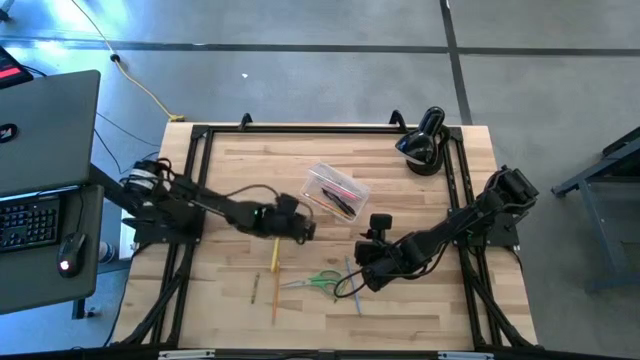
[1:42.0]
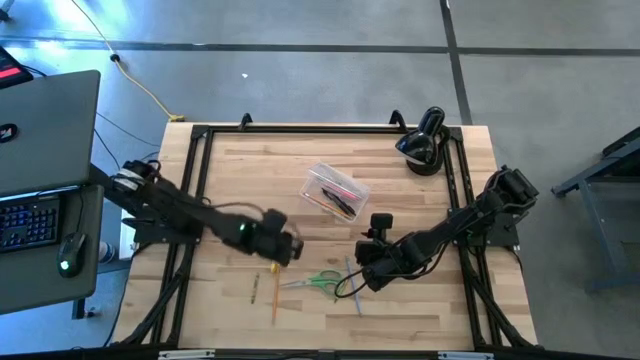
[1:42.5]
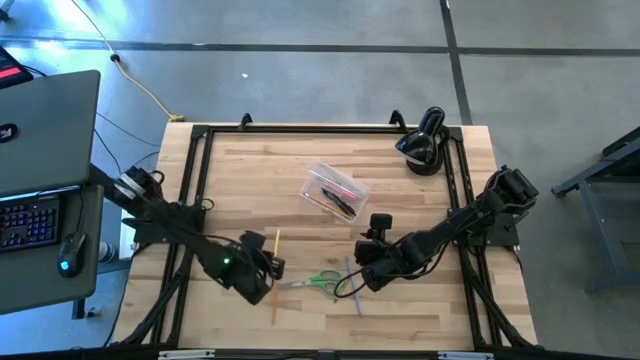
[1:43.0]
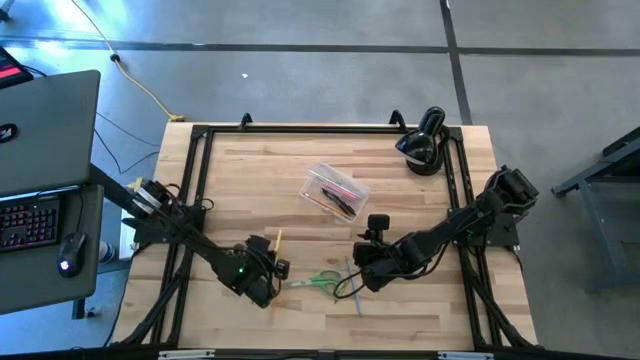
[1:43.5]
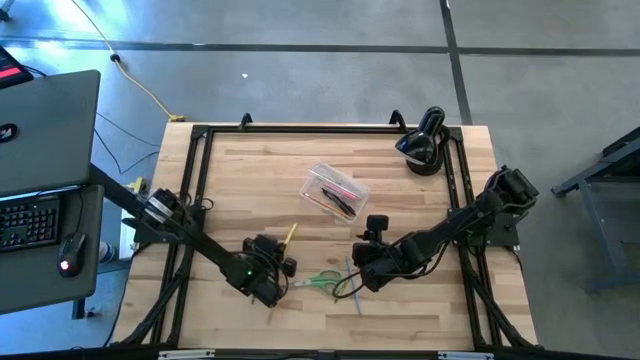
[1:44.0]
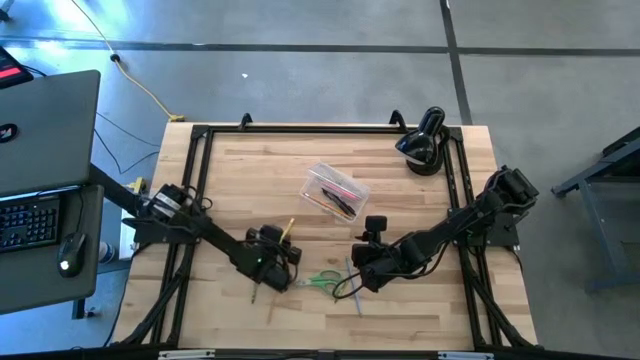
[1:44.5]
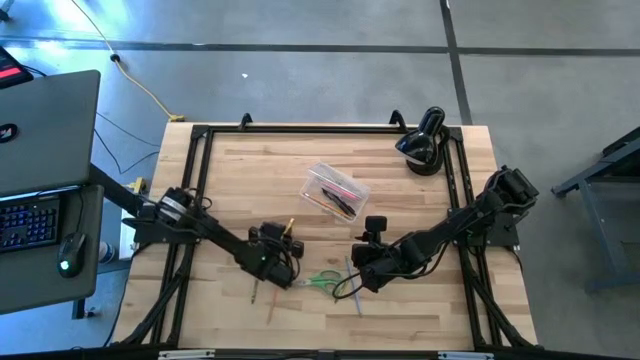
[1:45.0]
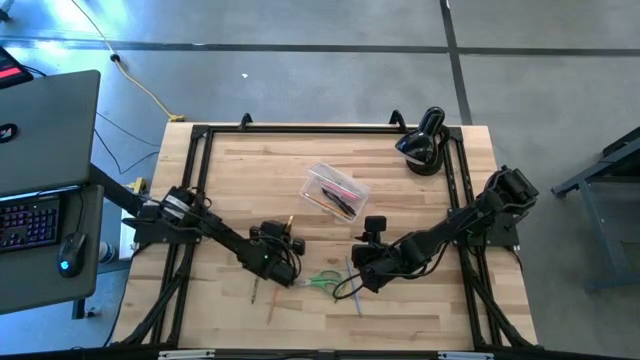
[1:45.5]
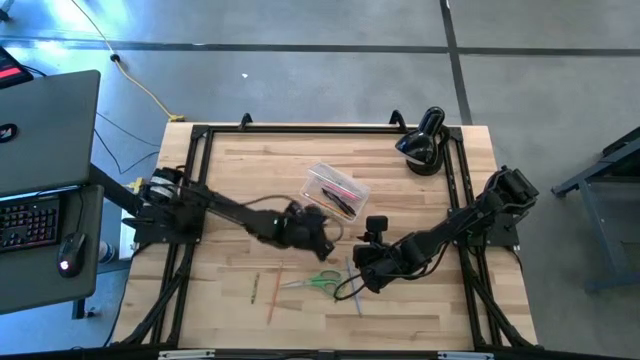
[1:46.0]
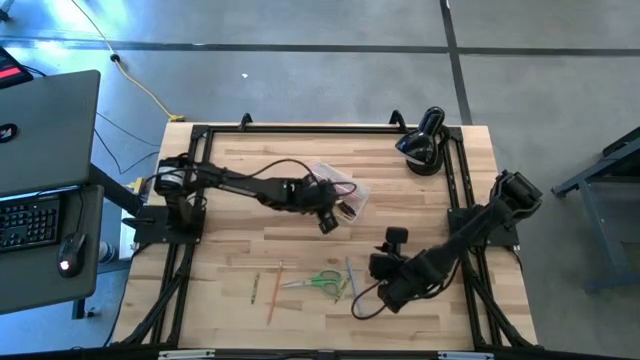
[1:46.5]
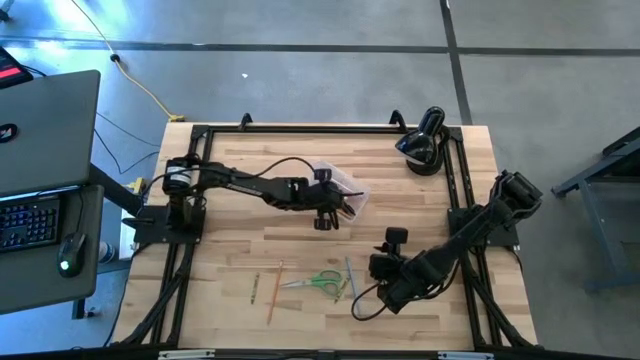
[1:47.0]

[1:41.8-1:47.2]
Task: Pick & place school supplies into a supply box
Put the yellow pen into the supply box

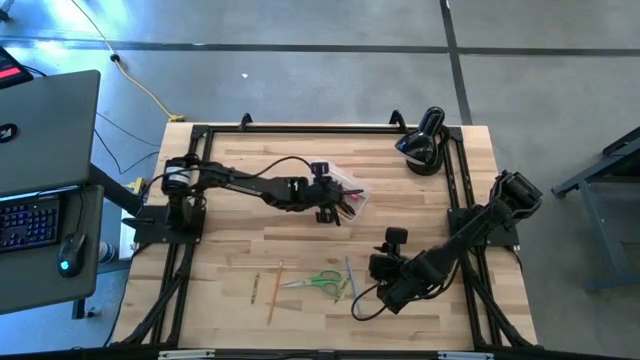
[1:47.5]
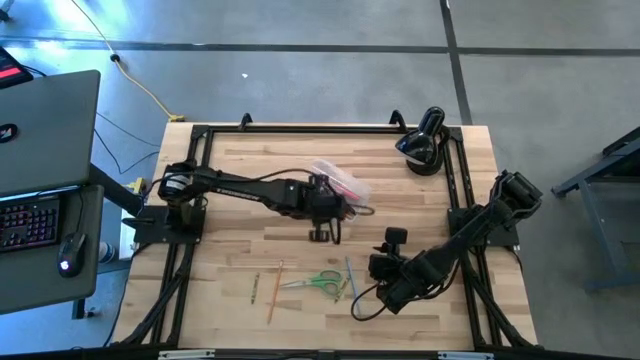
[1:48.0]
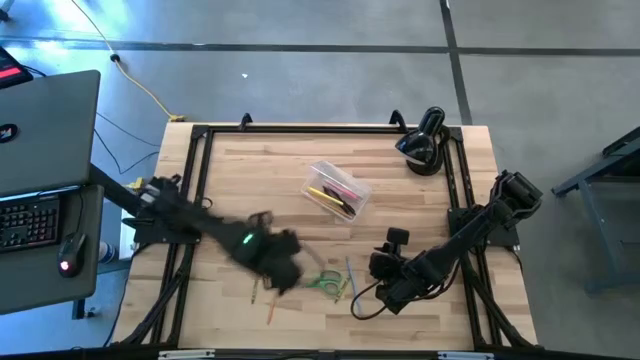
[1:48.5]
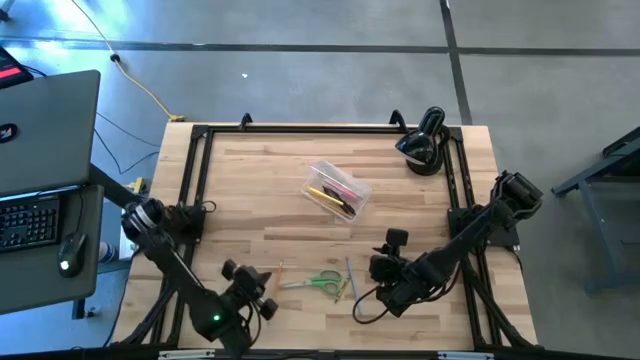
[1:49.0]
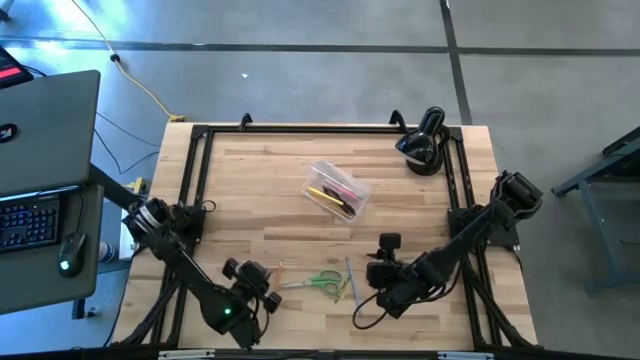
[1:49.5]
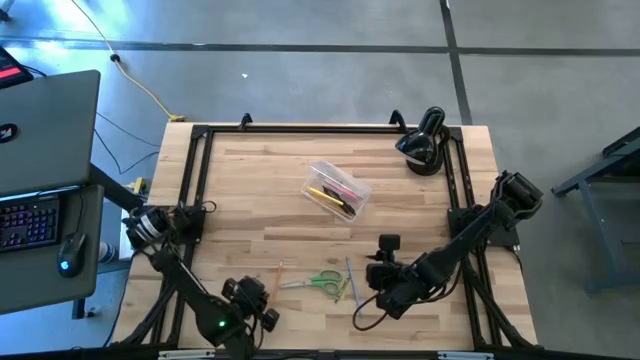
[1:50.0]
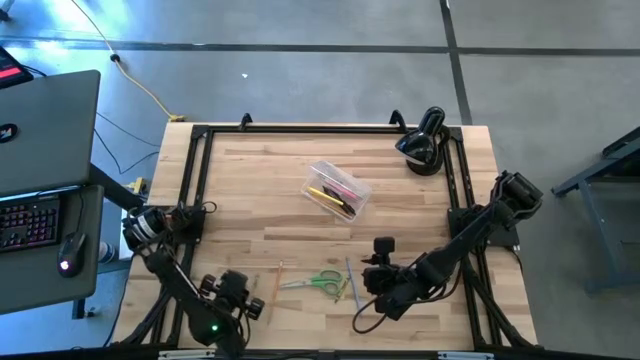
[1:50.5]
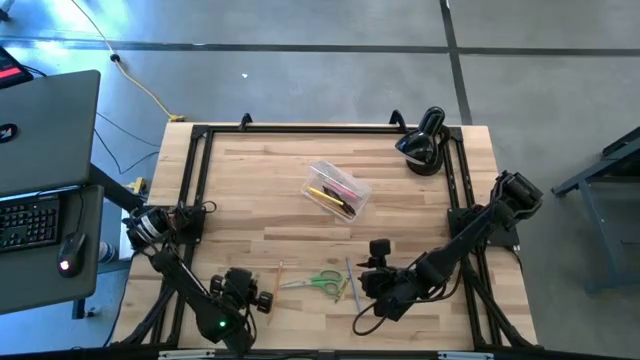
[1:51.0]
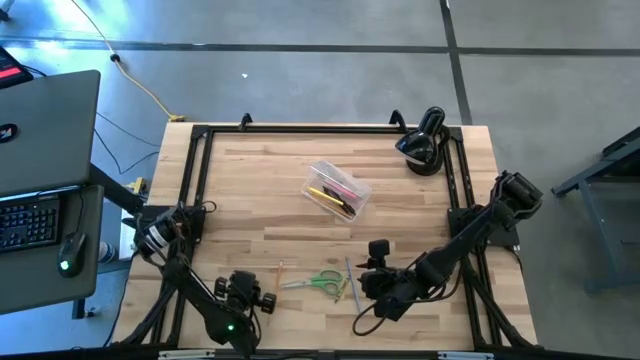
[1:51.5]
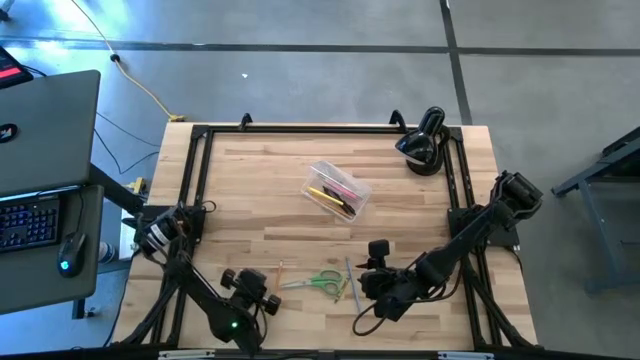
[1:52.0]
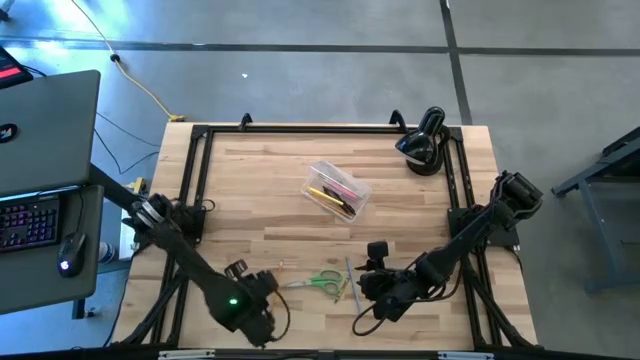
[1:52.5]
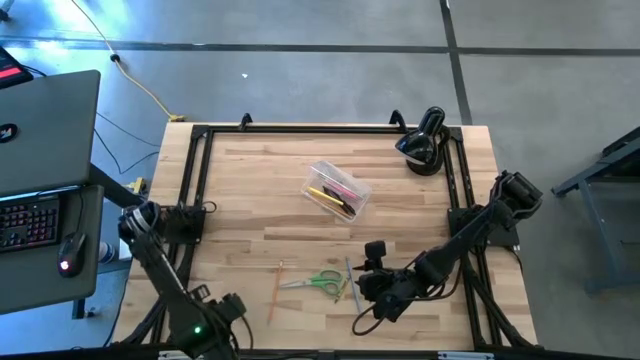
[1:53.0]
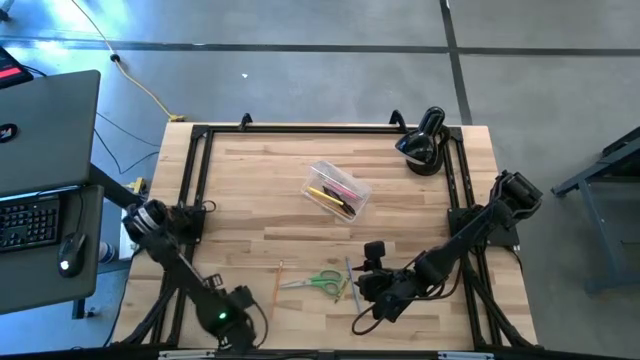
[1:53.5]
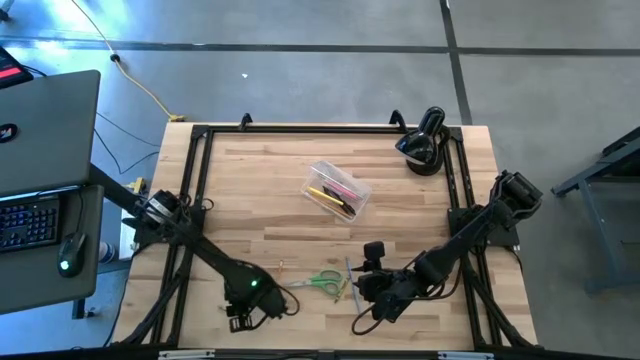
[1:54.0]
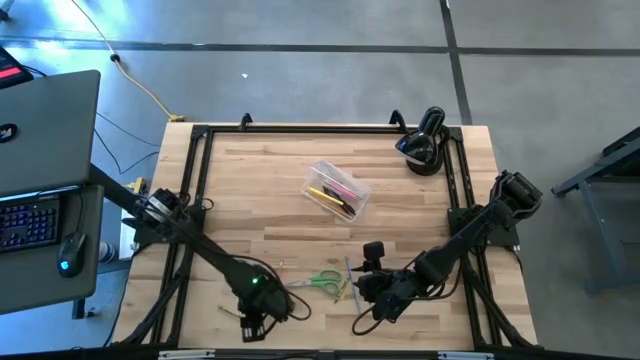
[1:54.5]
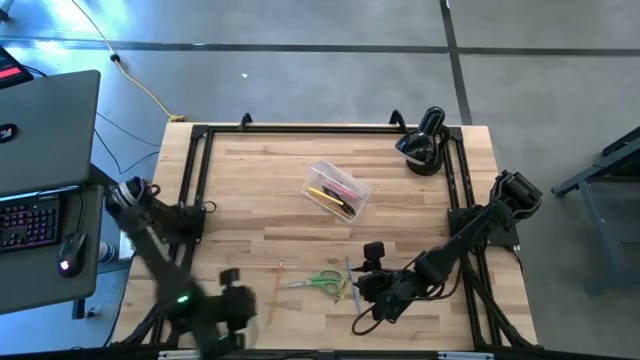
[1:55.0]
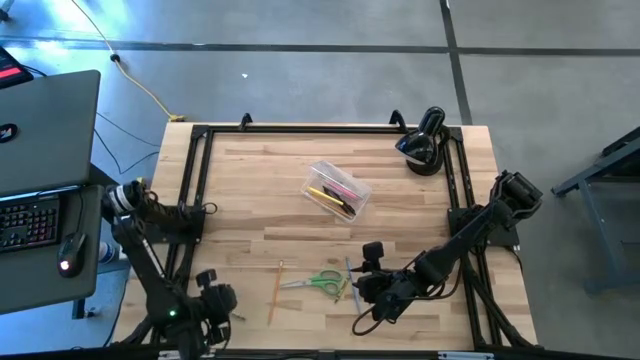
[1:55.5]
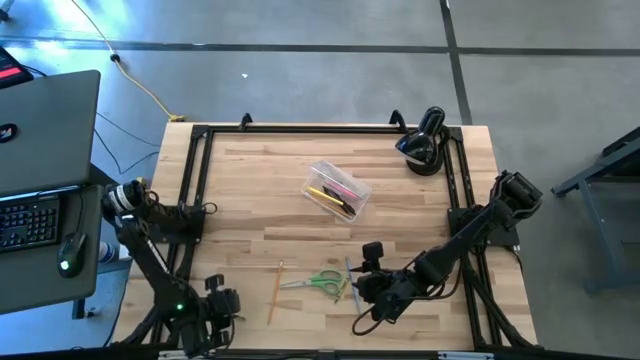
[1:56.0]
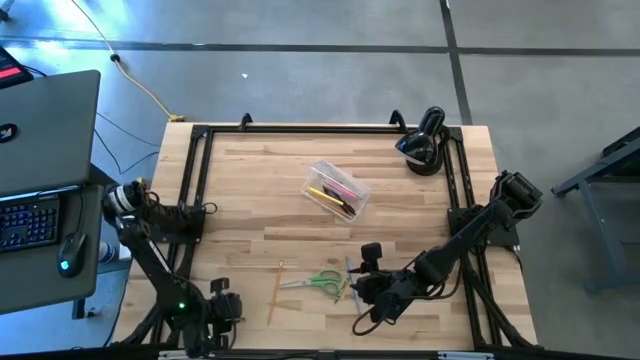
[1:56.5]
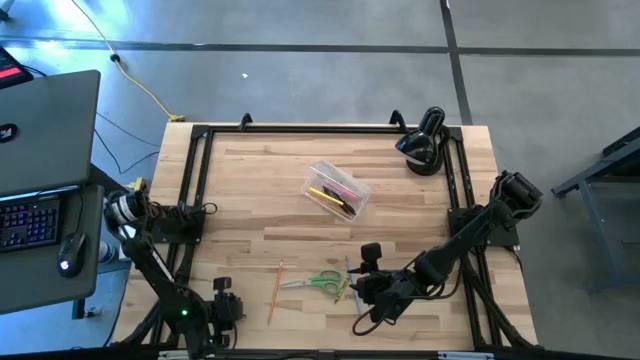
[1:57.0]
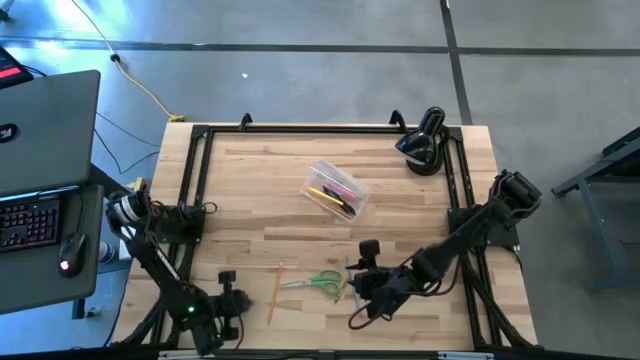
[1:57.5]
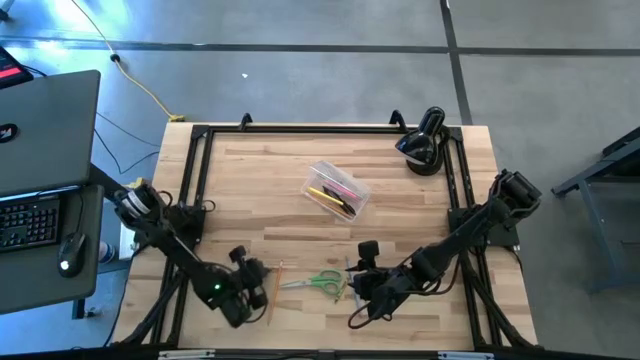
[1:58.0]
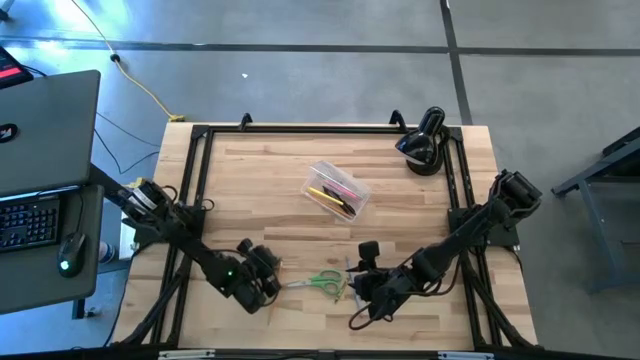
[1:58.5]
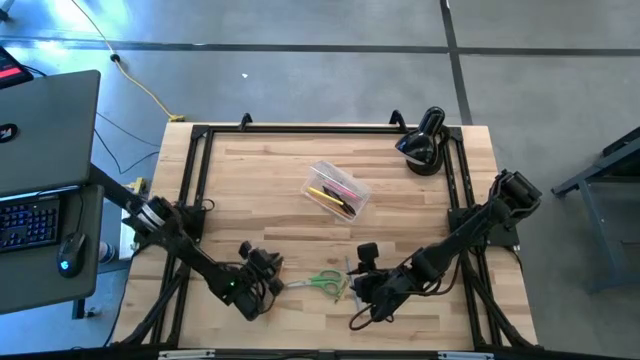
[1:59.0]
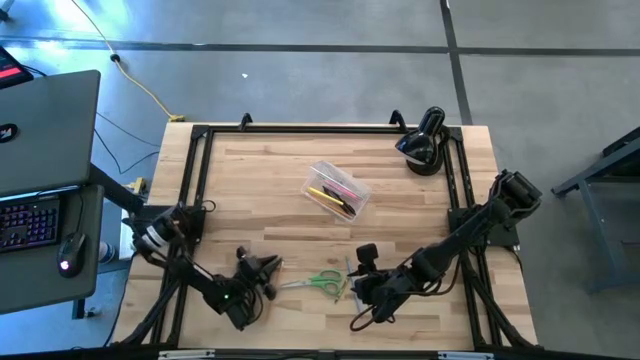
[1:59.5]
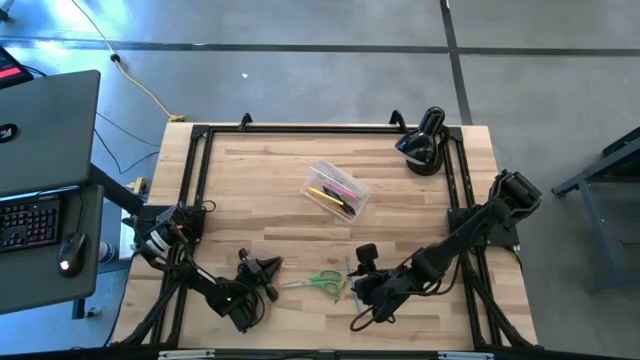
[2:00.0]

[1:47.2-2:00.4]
Put the left green crayon into the supply box

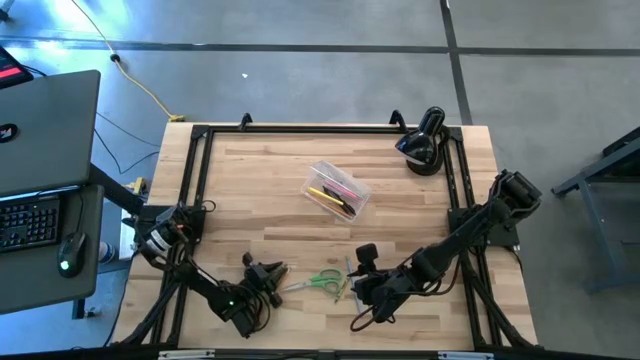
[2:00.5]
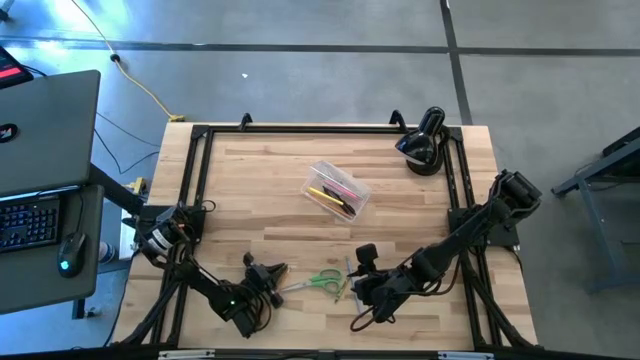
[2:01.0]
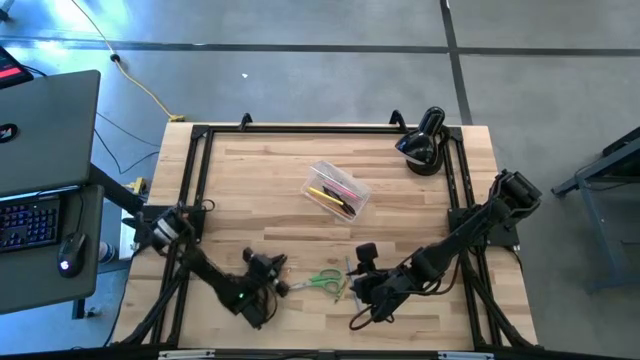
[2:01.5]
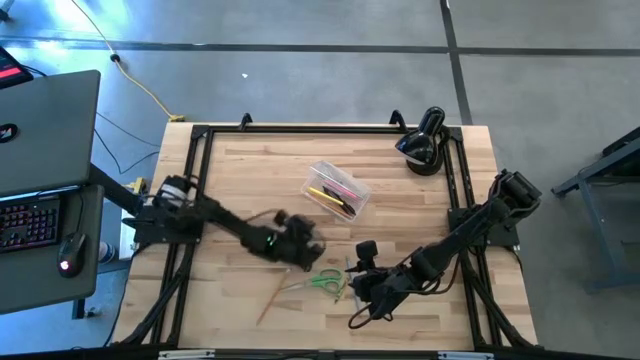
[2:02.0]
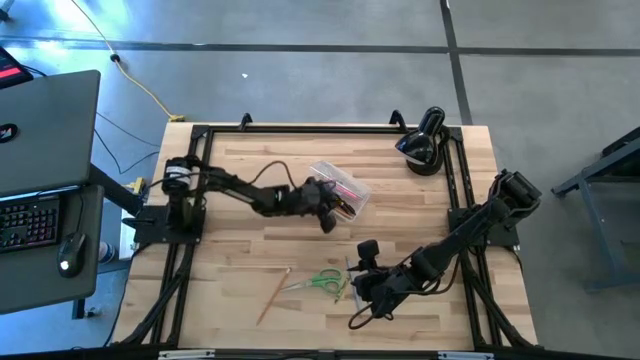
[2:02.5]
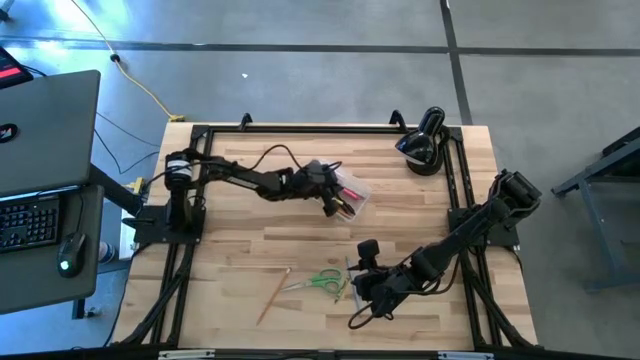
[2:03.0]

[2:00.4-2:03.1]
Put the left green crayon into the supply box
